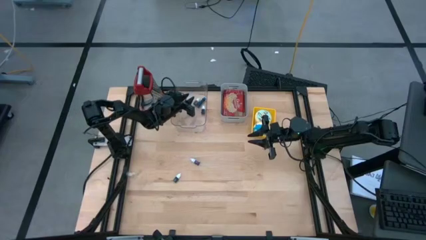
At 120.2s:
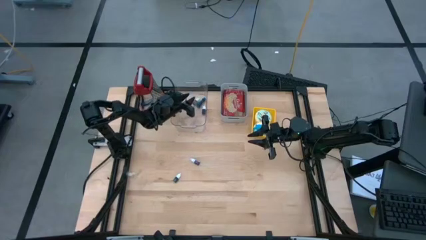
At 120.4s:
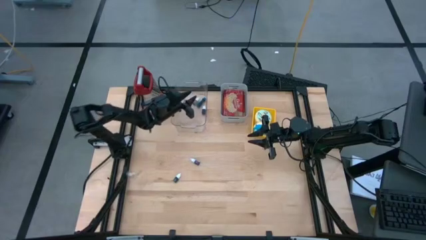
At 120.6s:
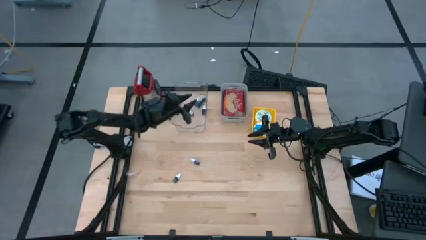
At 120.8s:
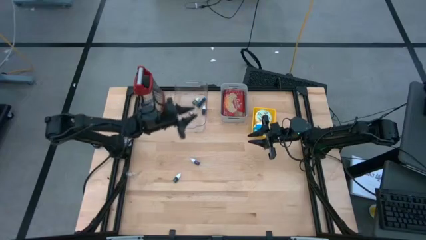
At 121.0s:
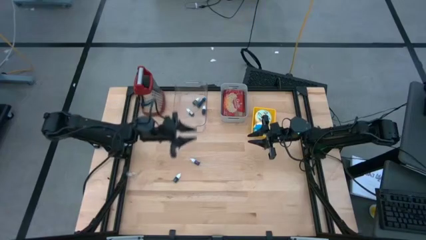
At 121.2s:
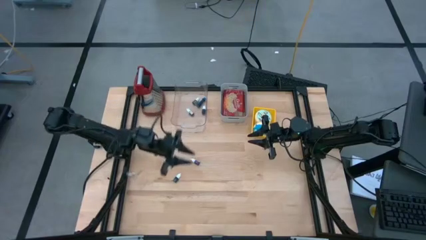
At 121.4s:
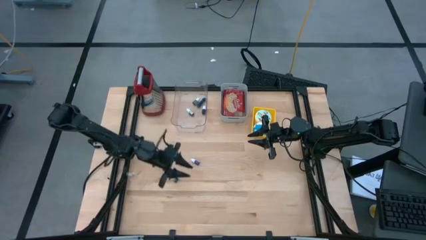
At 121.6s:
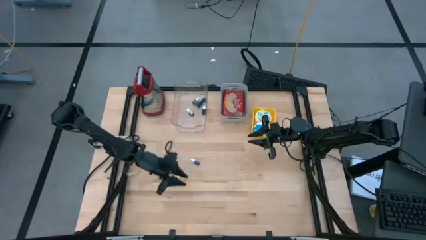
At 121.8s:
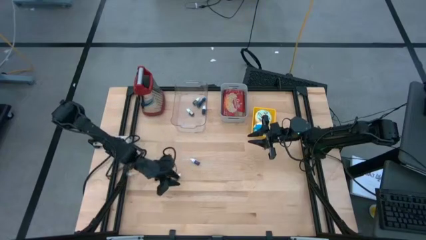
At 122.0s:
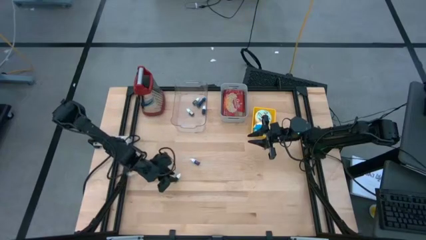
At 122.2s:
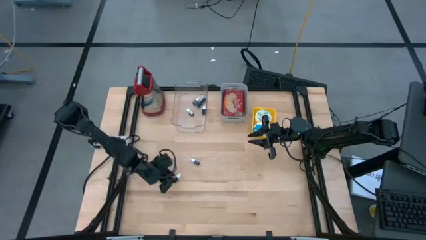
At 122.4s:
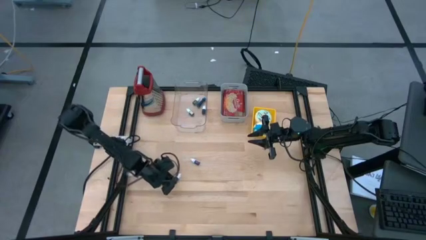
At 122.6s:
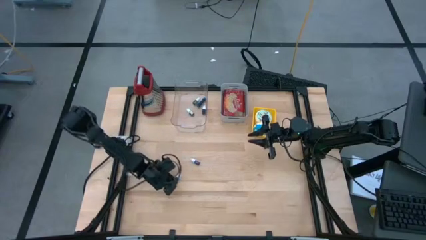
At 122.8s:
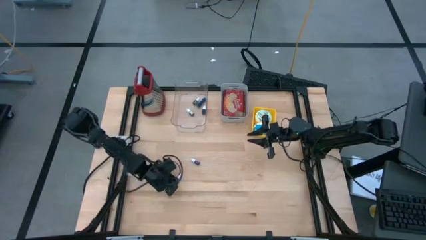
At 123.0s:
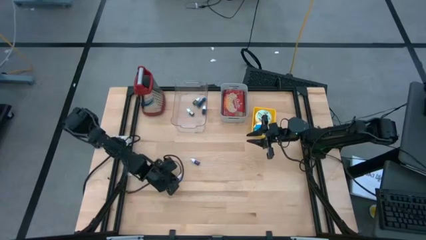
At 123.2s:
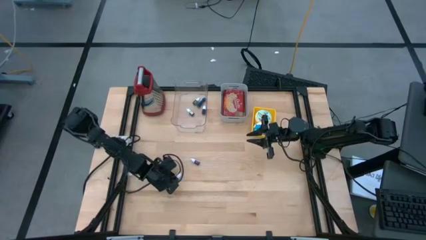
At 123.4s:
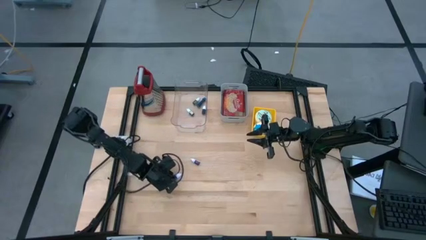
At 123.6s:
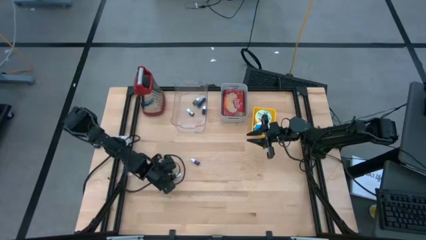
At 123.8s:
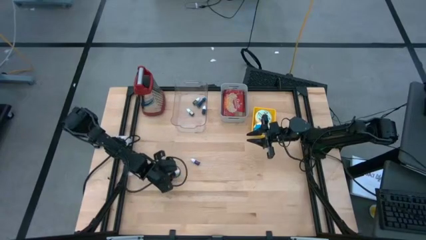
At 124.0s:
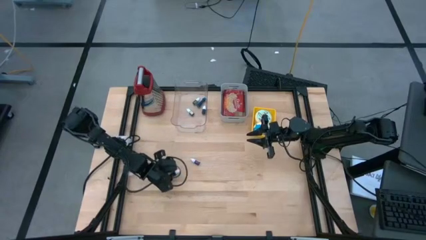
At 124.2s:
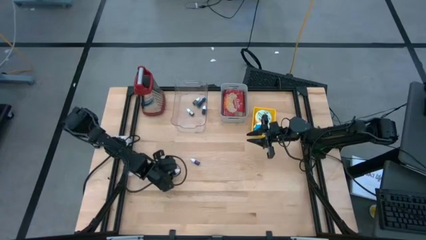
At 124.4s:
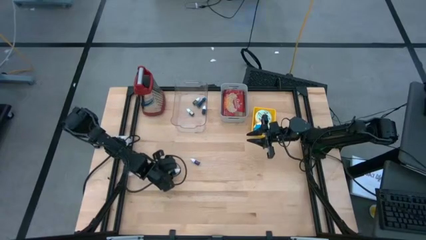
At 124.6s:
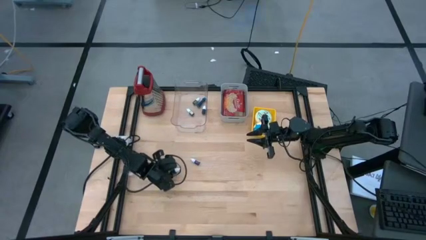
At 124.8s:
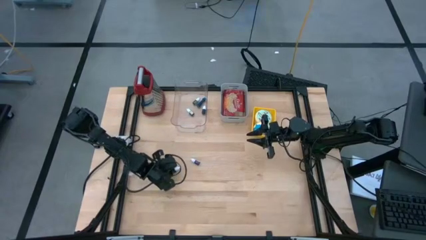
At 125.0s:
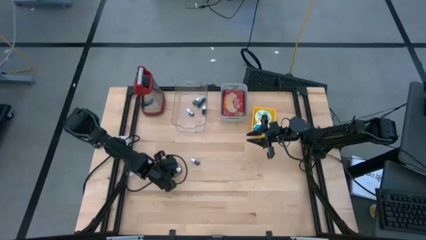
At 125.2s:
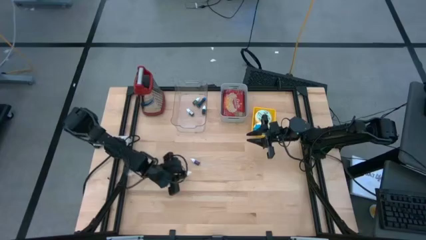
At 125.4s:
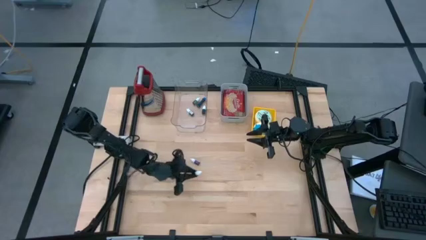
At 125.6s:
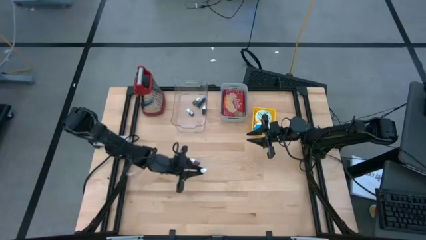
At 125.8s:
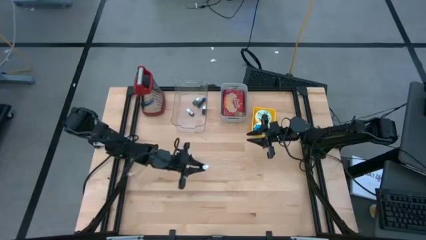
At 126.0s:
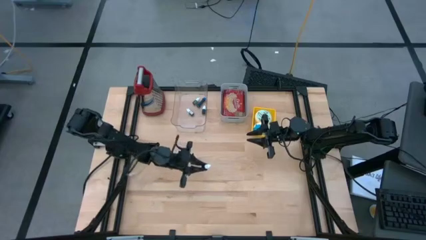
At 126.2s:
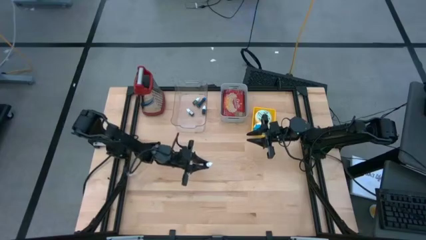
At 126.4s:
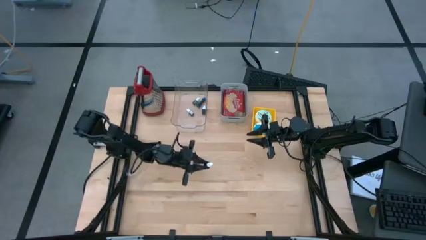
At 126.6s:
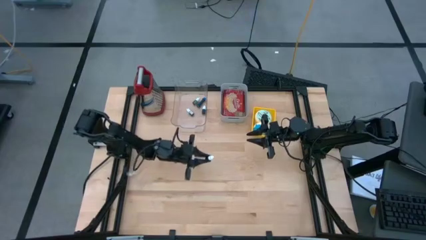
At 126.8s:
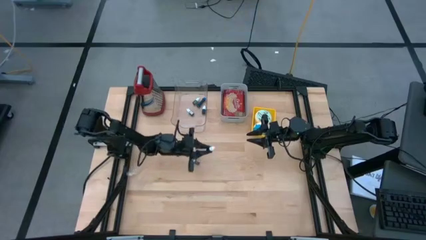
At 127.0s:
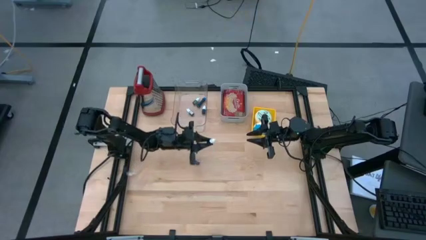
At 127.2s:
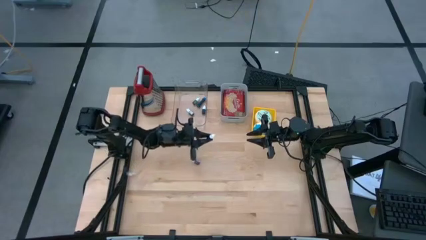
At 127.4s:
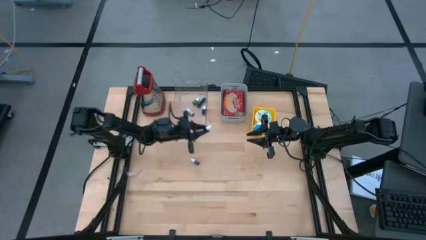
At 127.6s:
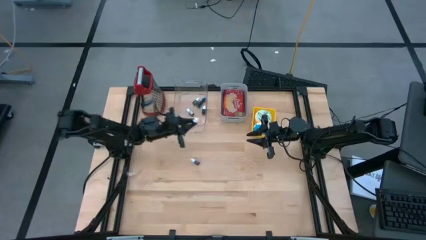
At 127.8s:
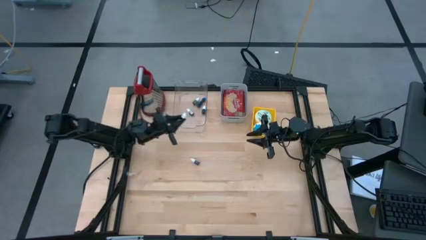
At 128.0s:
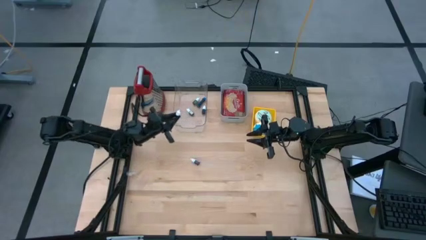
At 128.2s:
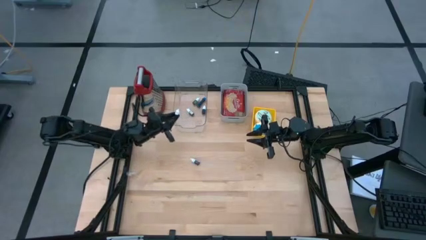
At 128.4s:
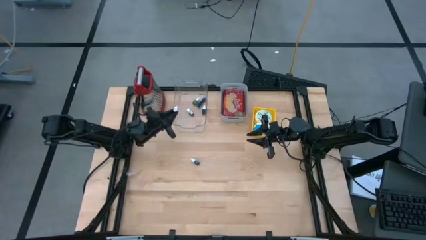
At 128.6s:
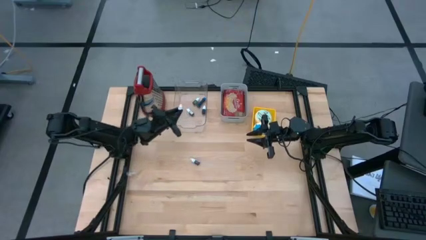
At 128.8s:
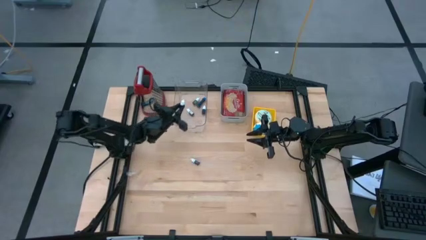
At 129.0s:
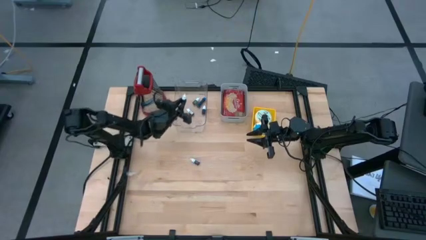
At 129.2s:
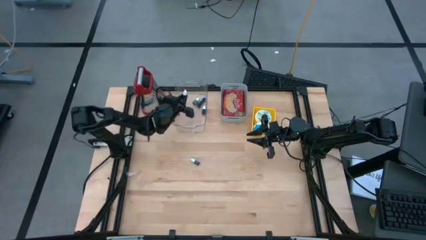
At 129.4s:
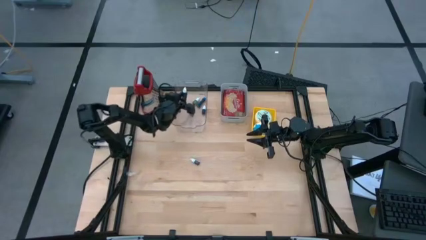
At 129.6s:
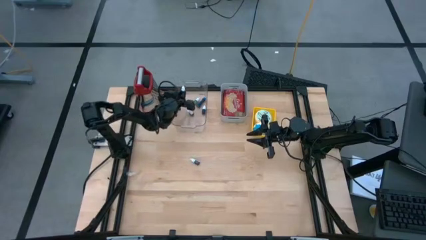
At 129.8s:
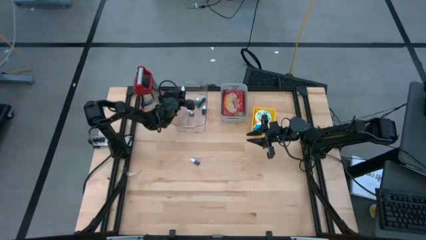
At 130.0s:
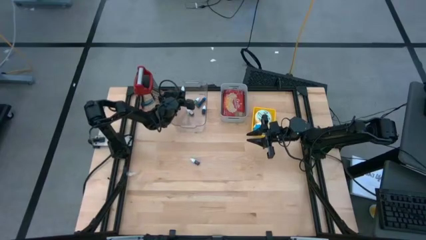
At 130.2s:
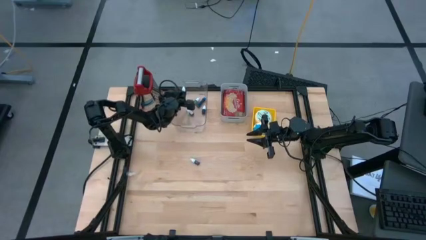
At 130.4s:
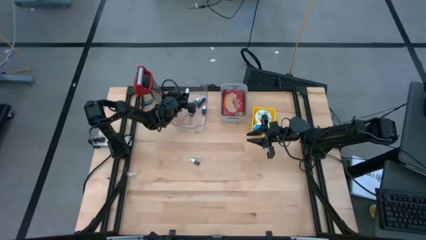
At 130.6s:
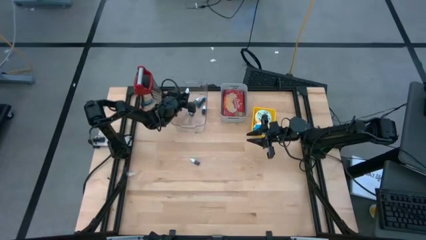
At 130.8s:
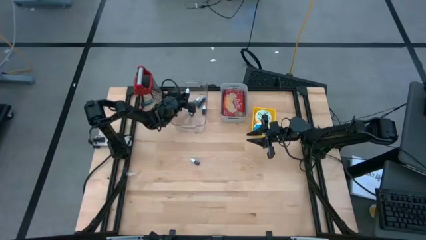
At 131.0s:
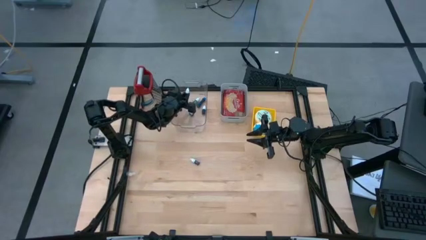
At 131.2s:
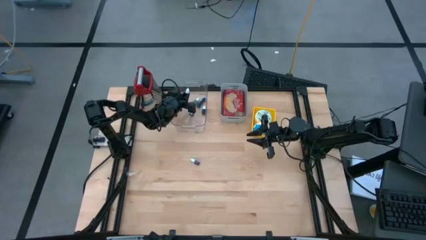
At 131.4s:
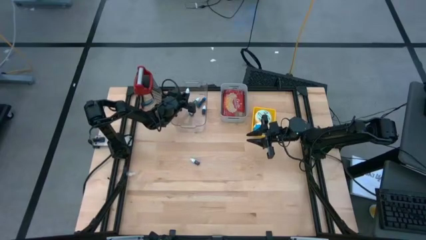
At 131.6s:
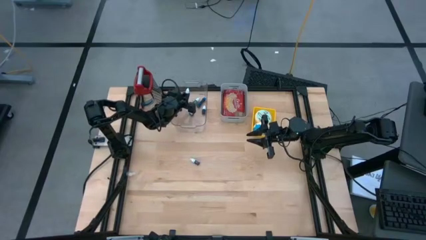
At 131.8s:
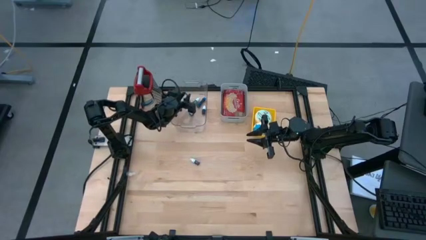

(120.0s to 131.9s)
Task: Pick & Place Food Item
Put the green food coloring into the transparent bin

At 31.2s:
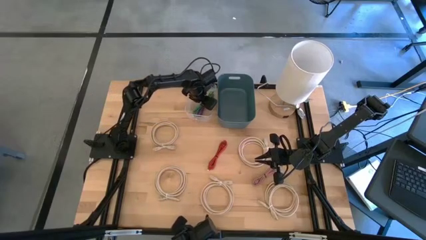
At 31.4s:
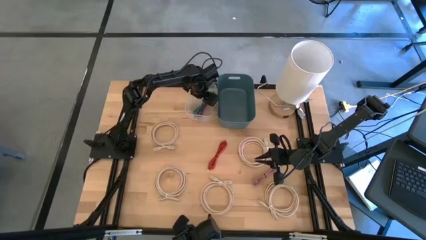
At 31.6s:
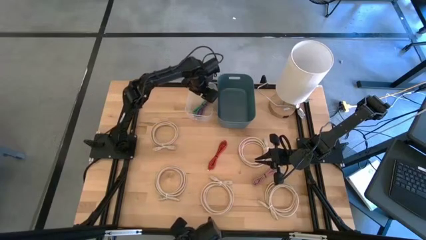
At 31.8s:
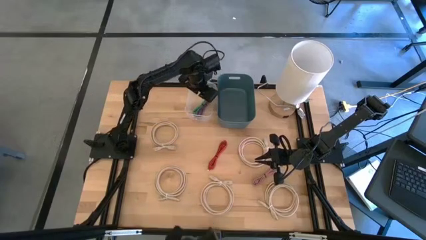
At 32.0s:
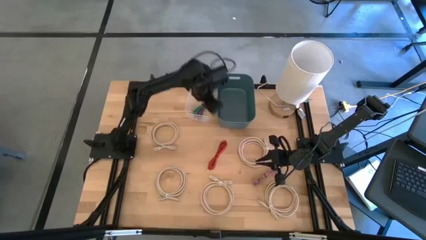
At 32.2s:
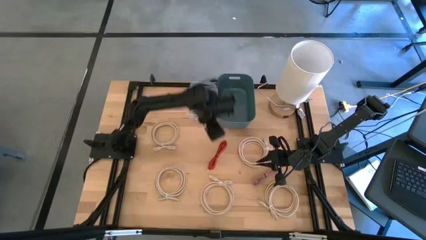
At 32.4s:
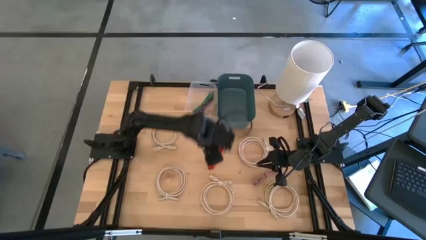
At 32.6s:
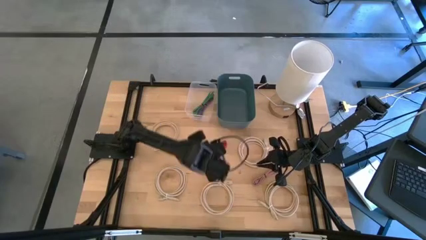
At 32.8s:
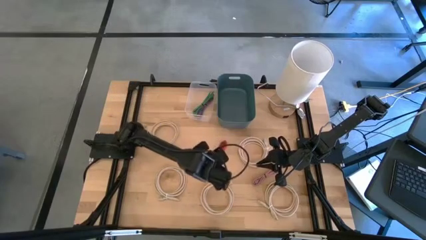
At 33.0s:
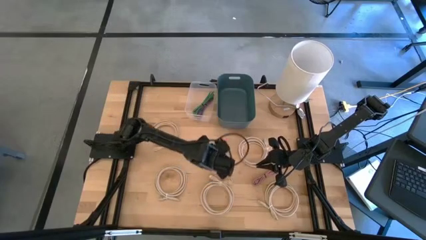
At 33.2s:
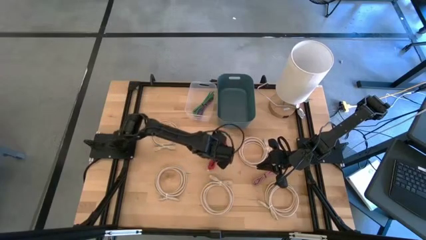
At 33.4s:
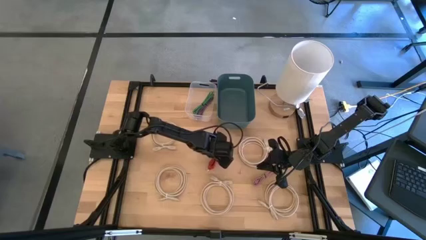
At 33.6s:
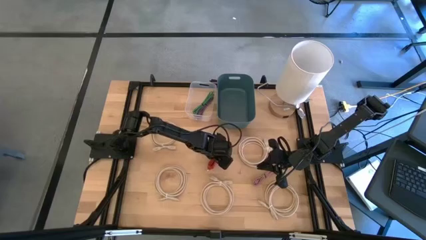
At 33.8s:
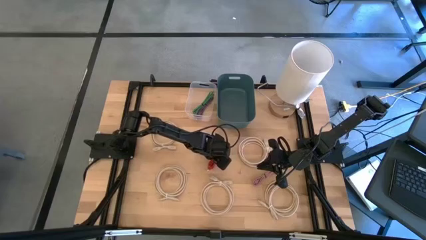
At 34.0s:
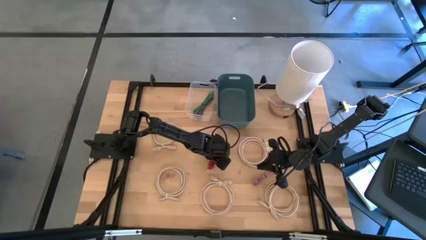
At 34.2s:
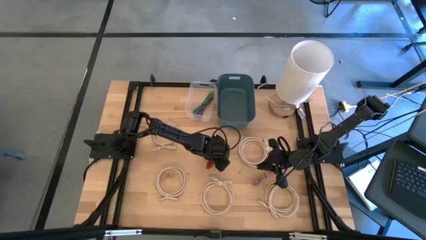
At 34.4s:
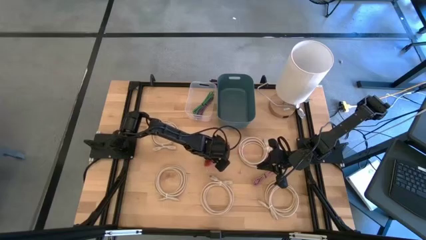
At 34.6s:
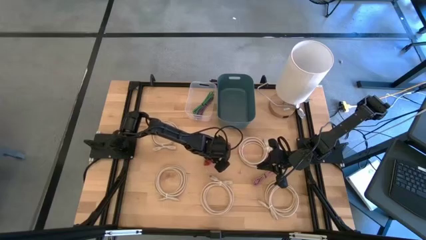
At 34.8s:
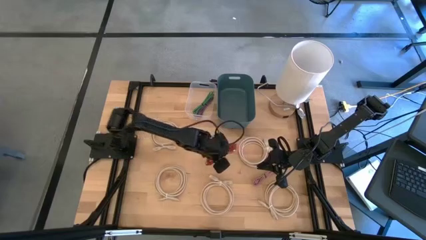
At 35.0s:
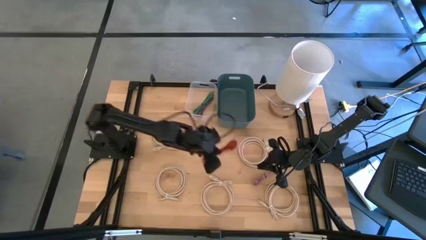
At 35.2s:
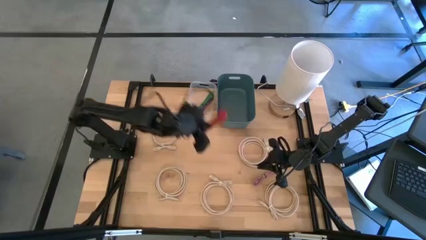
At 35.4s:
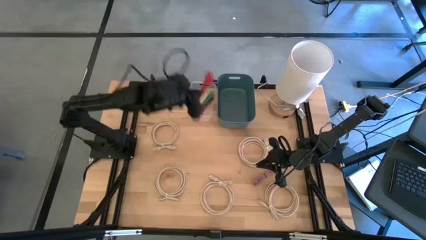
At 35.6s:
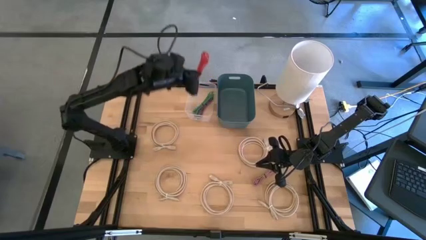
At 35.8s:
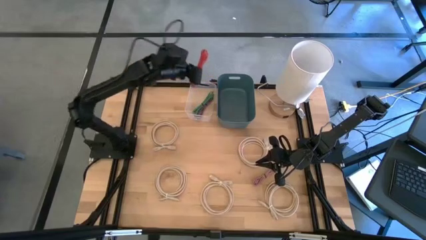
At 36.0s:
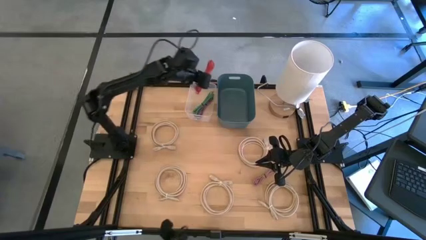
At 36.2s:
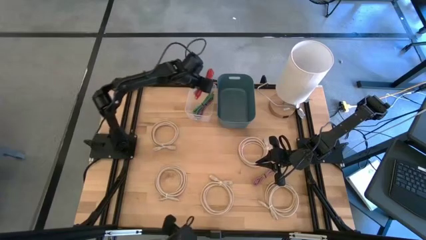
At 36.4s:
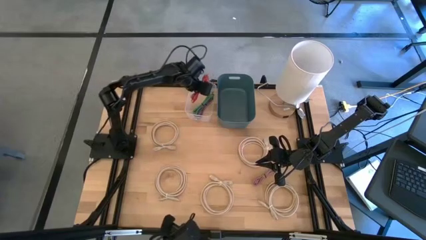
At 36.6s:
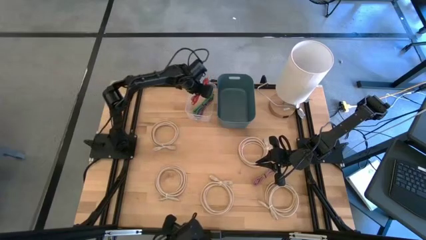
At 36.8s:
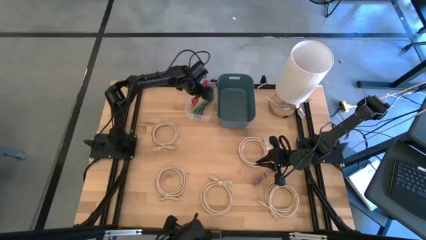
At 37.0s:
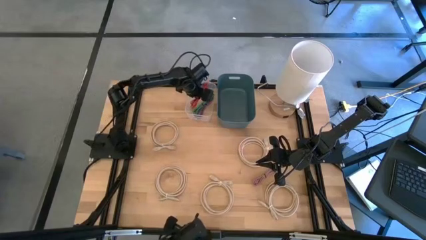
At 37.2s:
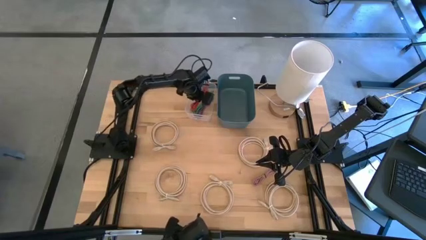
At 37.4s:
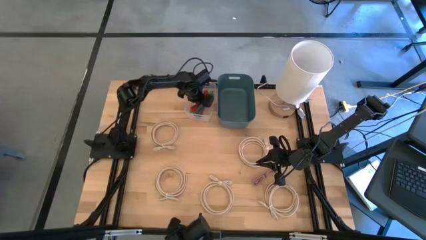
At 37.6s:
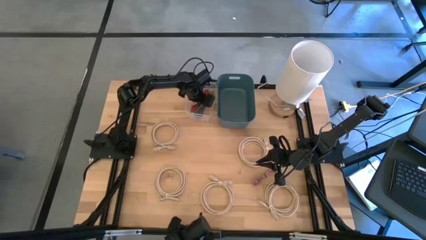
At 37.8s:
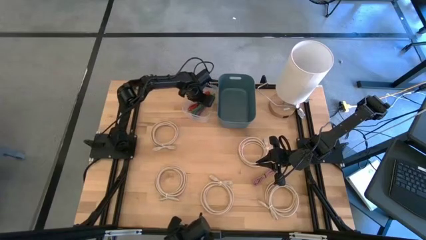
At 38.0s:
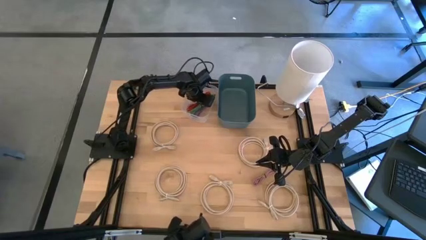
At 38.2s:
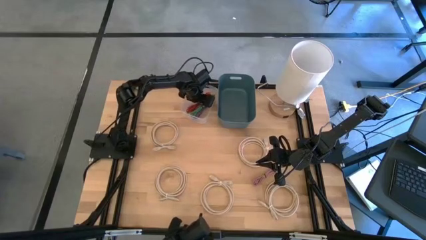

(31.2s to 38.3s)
Task: Pick and place USB-C Cables
Put the red USB cable into the transparent bin
